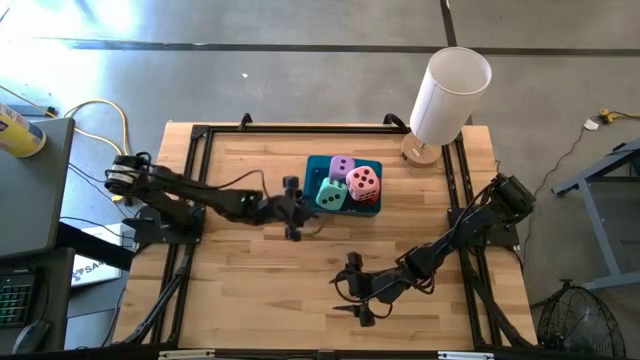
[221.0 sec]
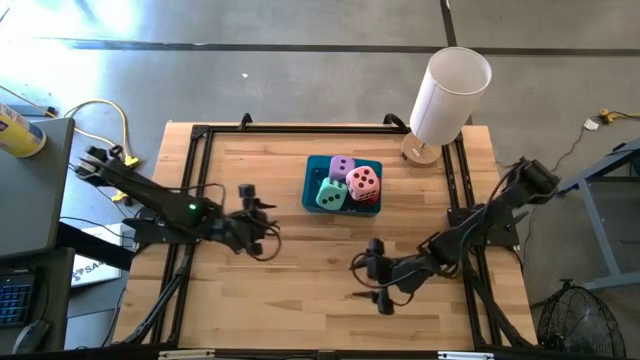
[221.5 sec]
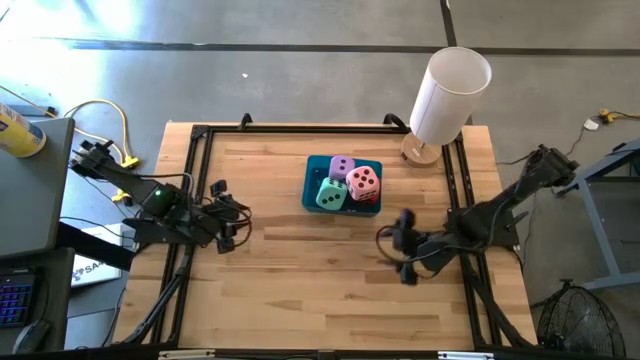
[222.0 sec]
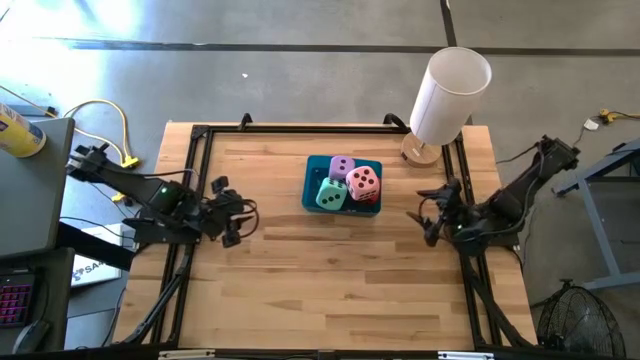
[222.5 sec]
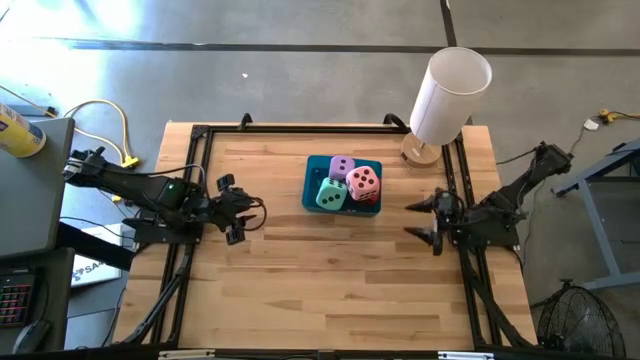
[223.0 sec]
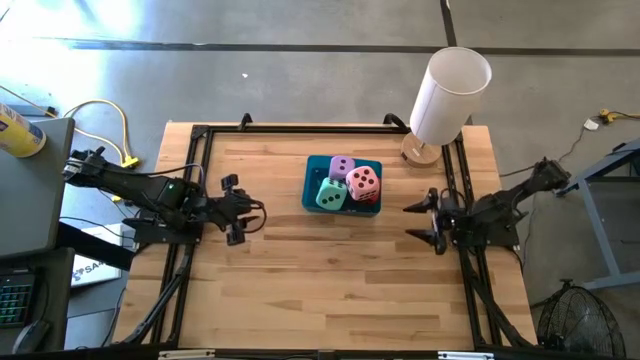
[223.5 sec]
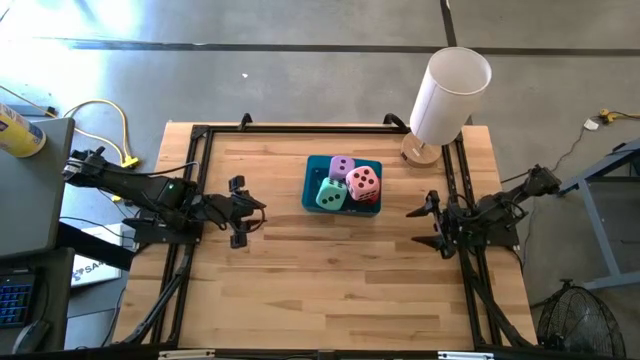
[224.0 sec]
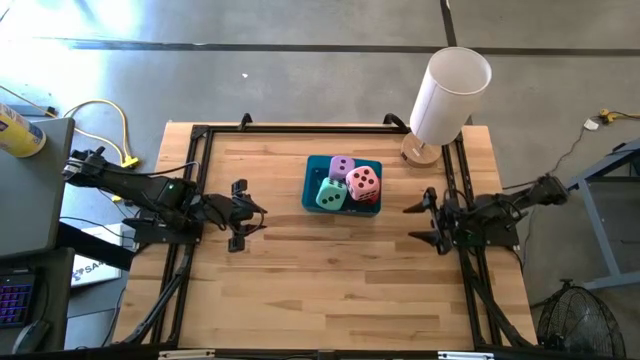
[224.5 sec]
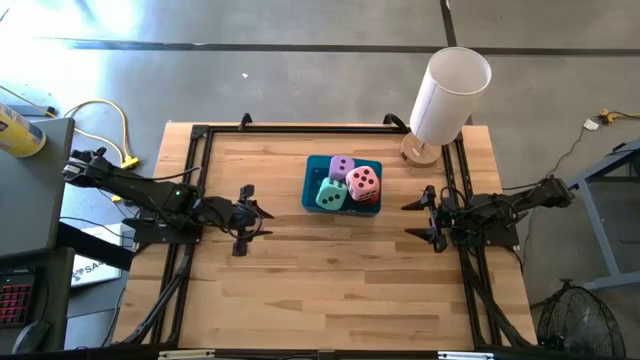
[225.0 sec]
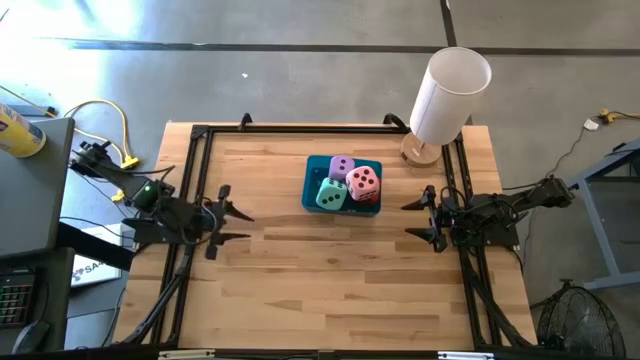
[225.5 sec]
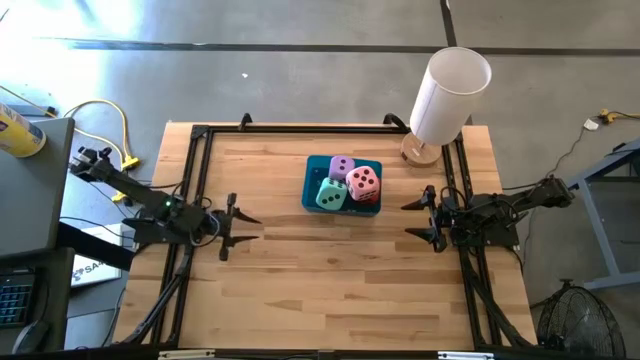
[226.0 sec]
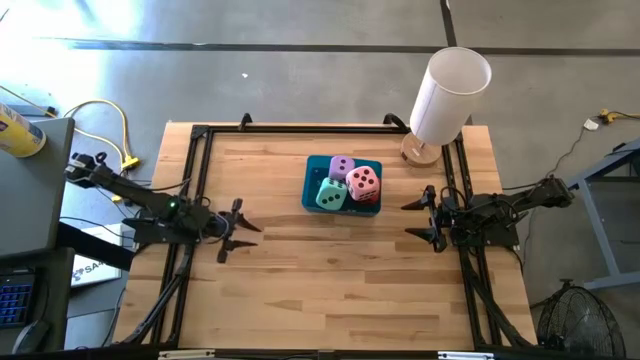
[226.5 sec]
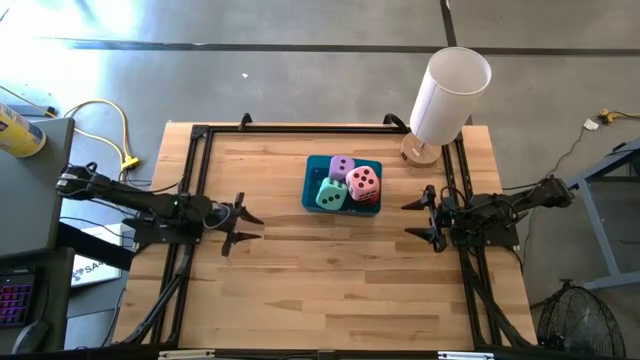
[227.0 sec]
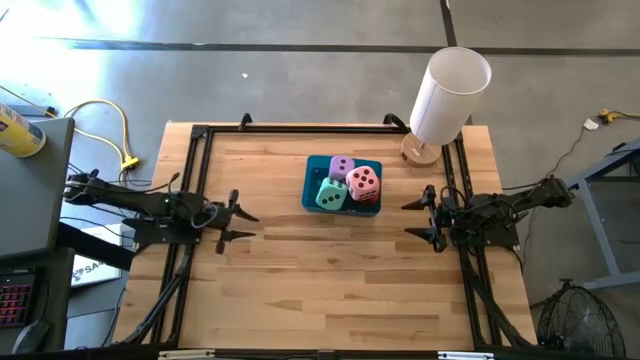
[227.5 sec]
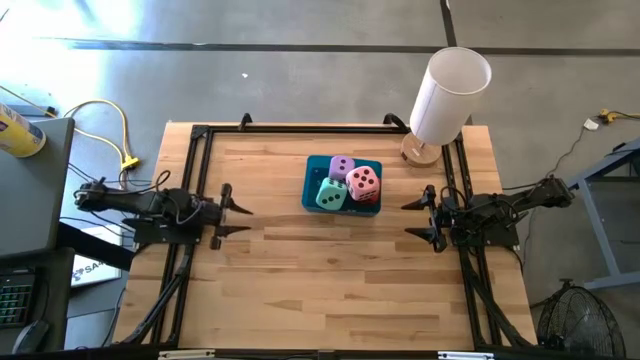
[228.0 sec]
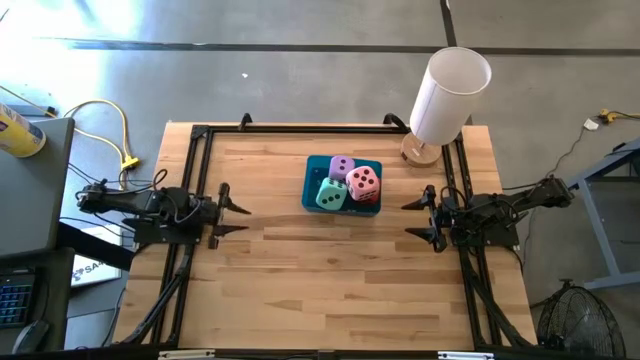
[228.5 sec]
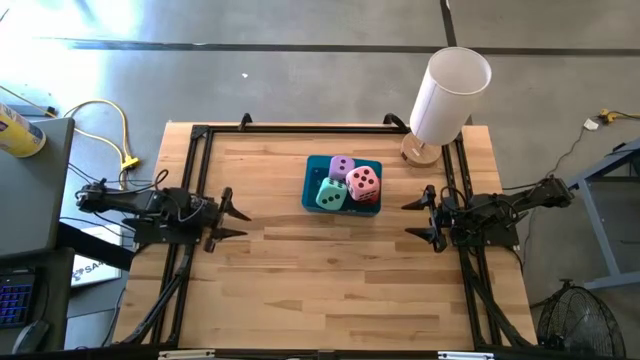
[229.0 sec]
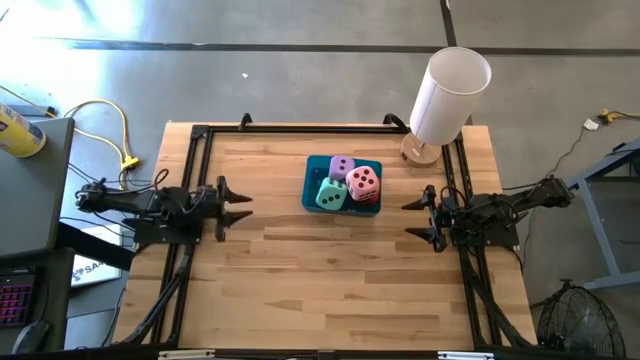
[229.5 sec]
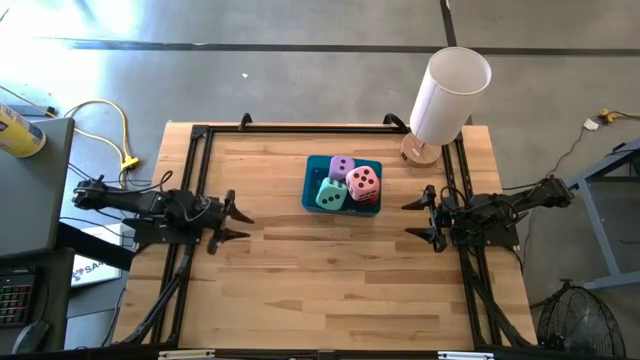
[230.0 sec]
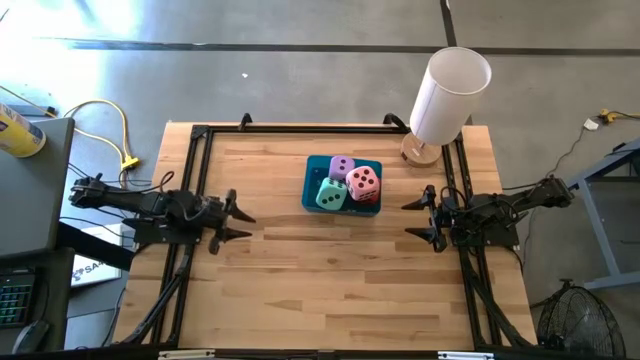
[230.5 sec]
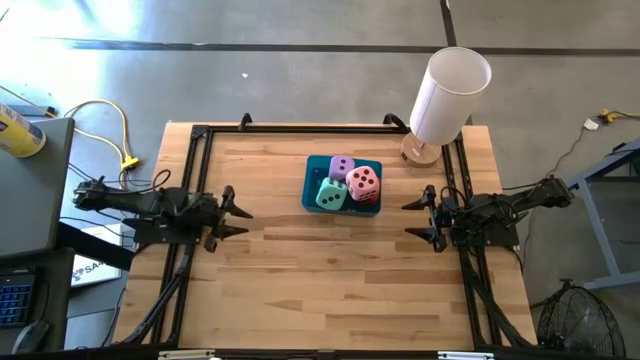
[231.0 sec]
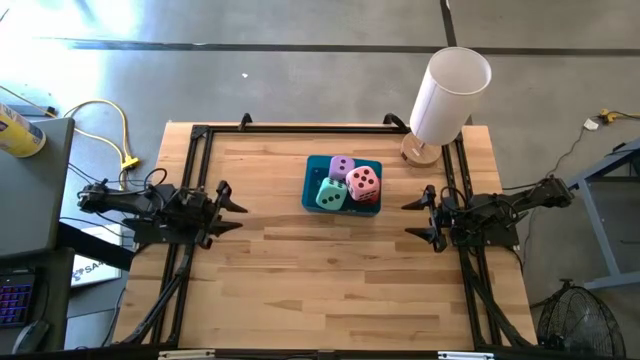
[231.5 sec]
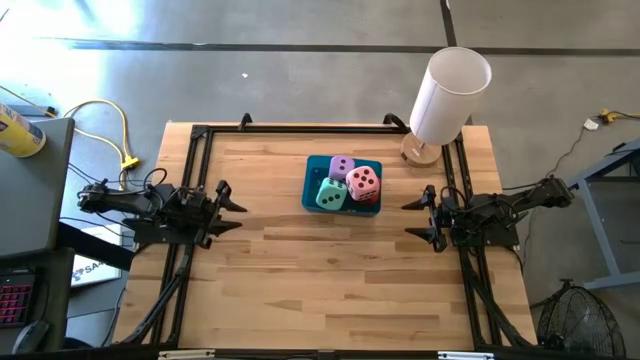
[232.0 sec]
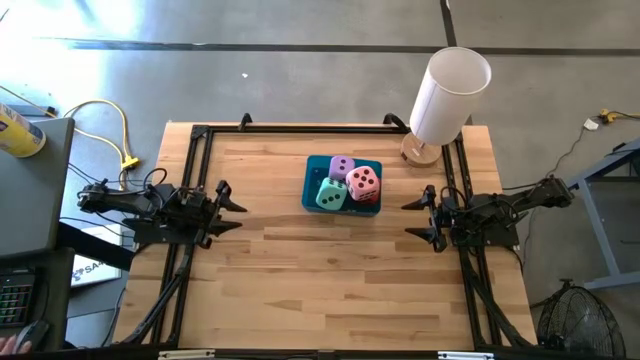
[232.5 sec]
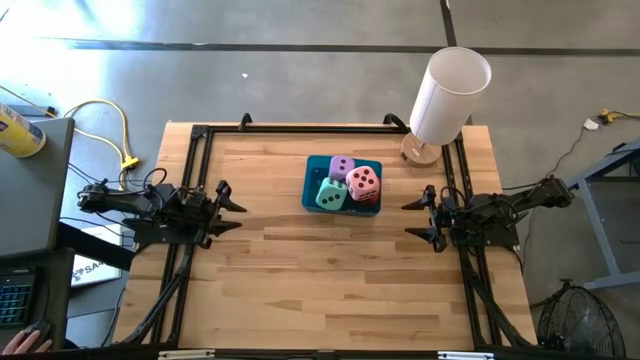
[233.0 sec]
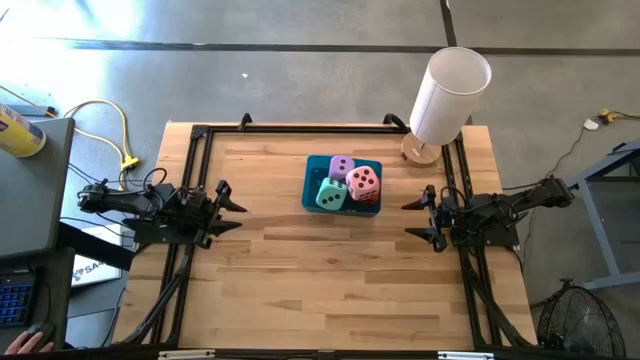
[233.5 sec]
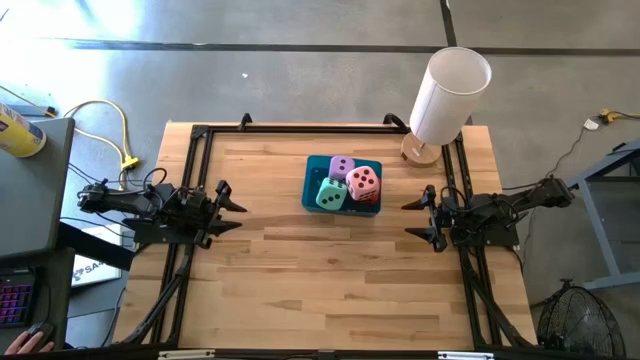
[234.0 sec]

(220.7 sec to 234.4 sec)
Task: Pick & Place Dice
Return to Home Position

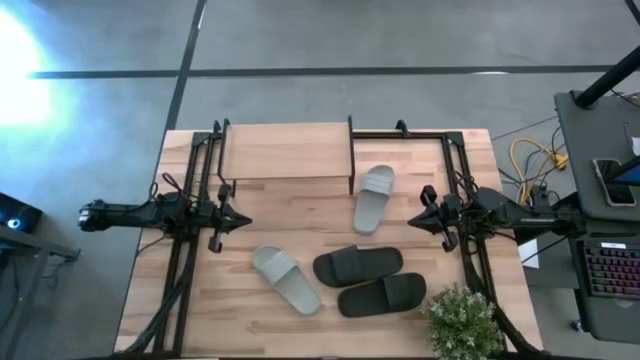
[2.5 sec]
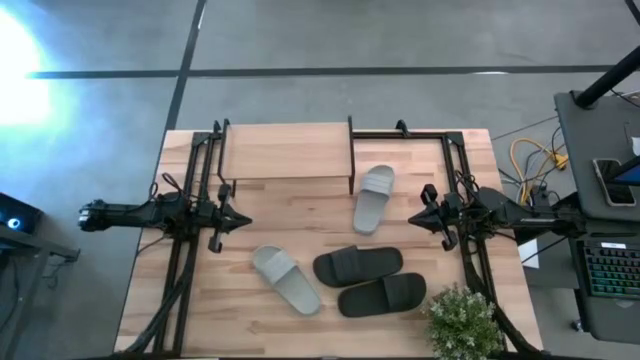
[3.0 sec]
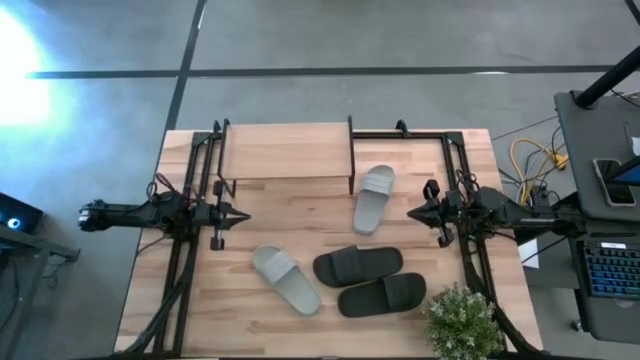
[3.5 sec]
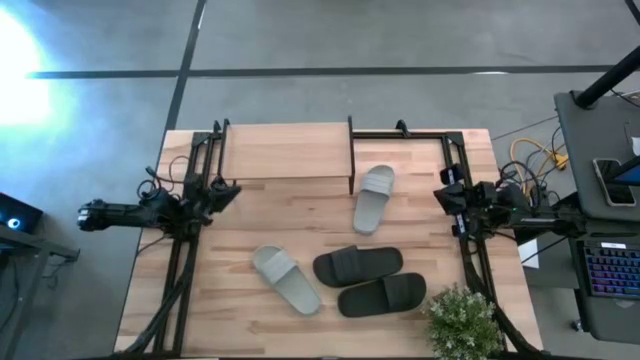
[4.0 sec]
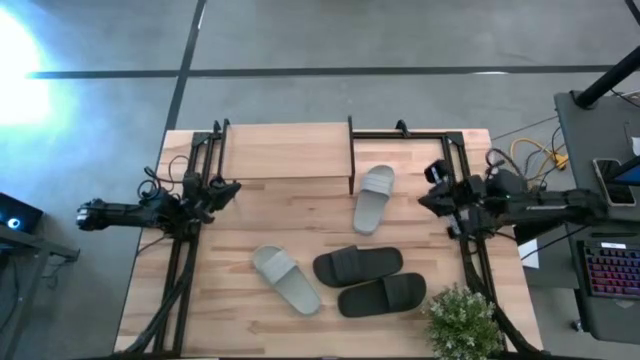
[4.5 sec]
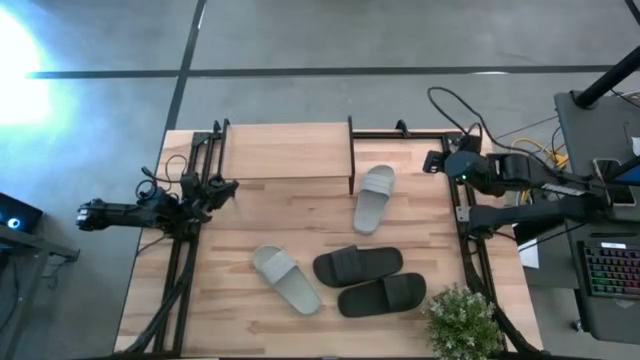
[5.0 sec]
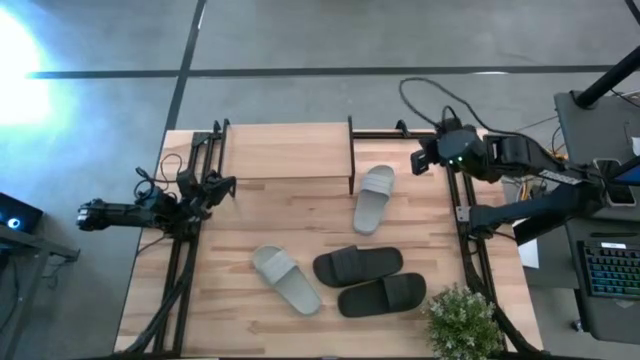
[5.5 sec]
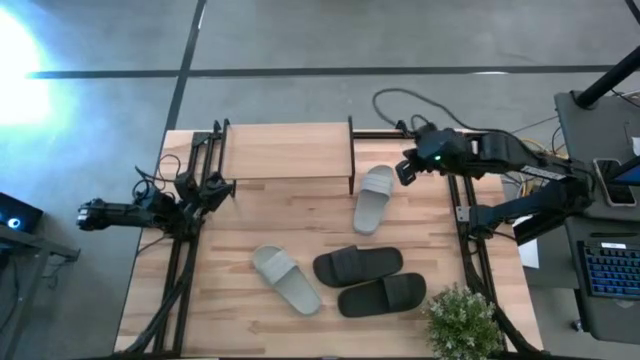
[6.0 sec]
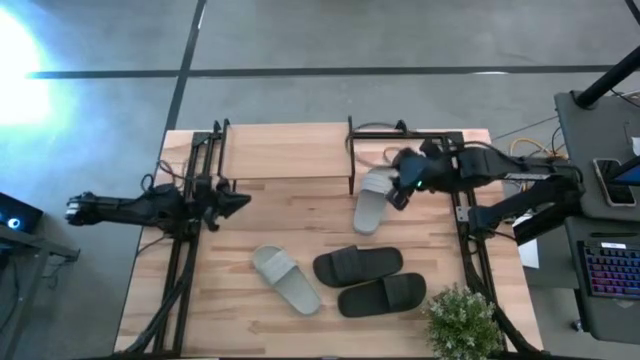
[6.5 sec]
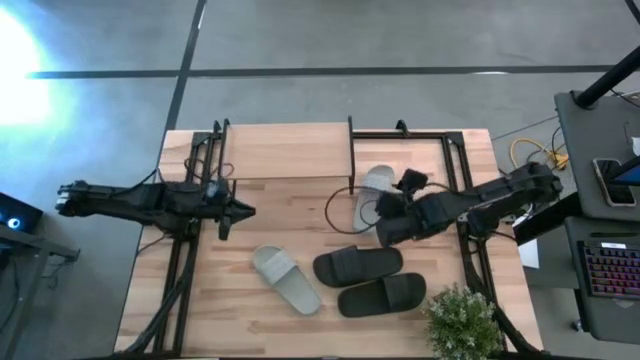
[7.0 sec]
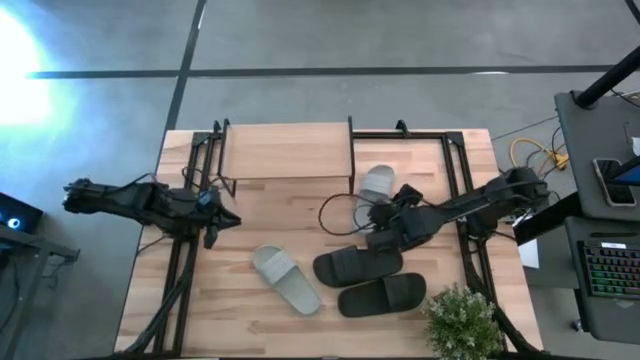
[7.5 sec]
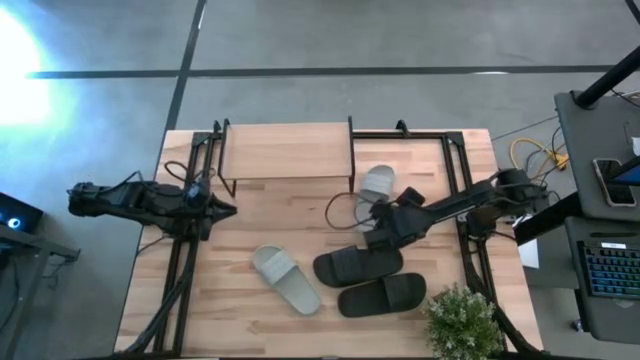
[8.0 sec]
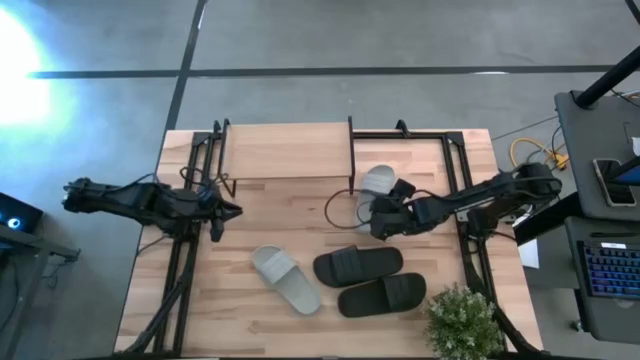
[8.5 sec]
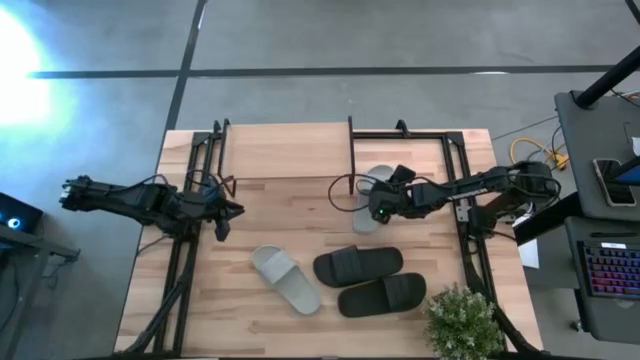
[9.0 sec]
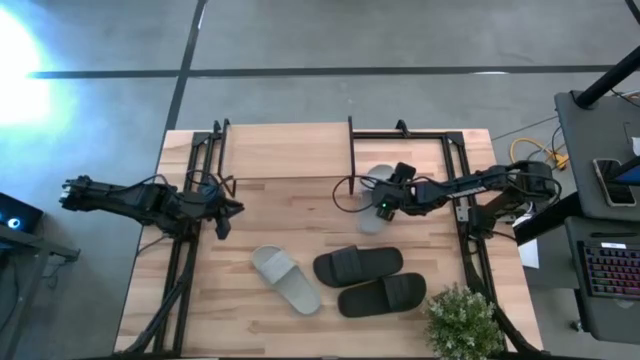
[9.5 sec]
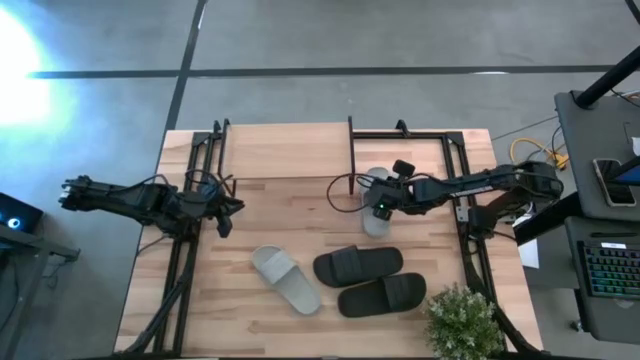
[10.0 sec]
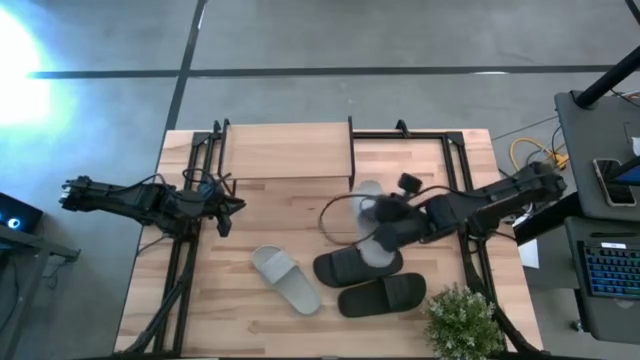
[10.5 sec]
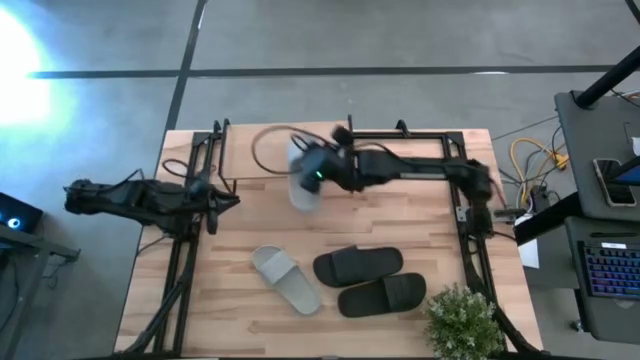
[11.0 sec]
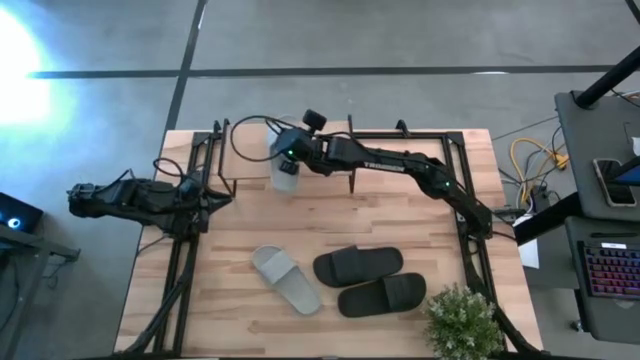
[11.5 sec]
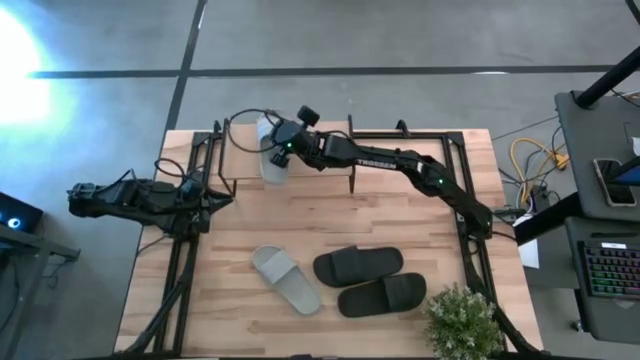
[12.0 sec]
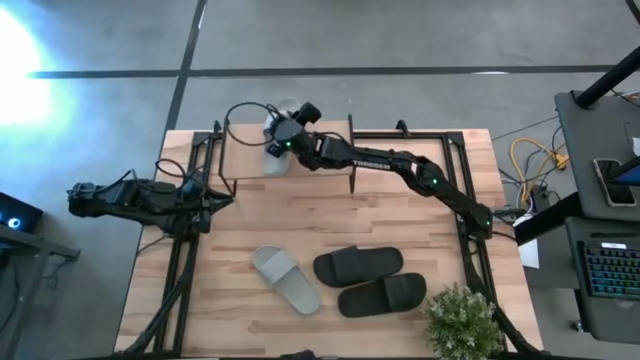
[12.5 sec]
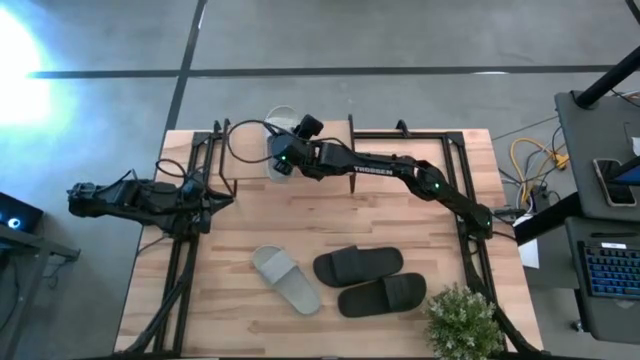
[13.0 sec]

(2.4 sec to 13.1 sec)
Task: Pick and place slides into the shelf
Put the top gray slides on the shelf
